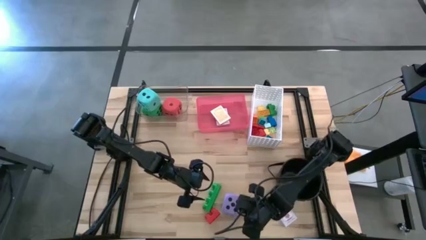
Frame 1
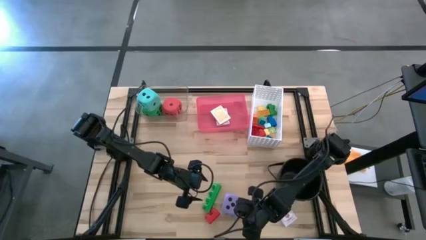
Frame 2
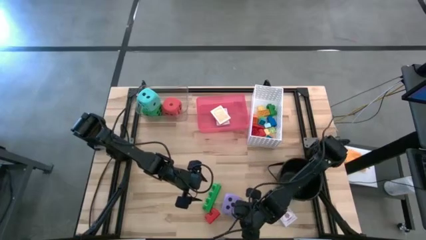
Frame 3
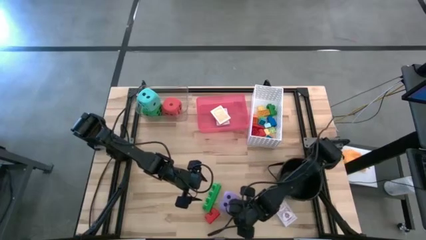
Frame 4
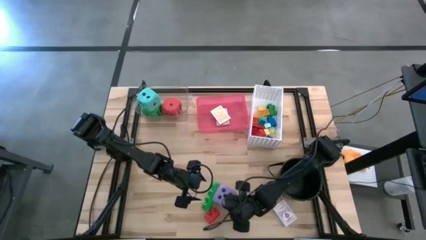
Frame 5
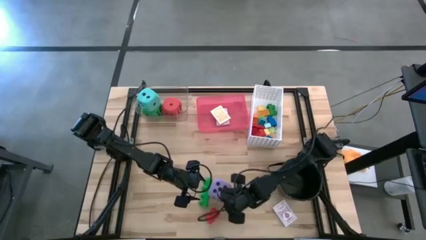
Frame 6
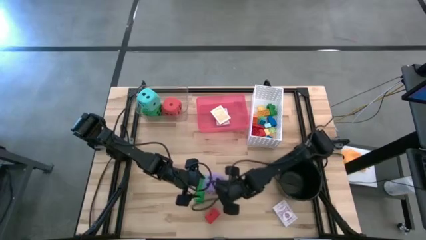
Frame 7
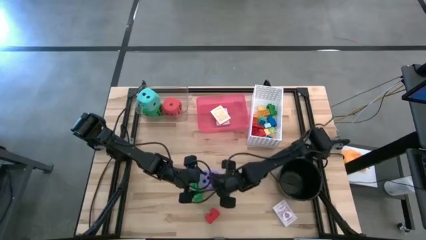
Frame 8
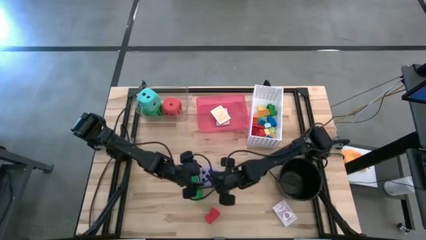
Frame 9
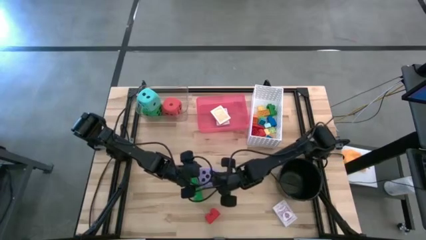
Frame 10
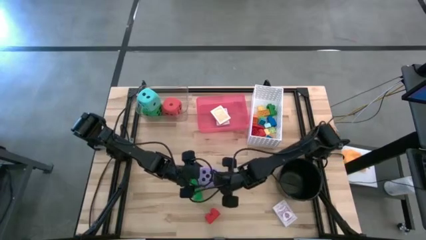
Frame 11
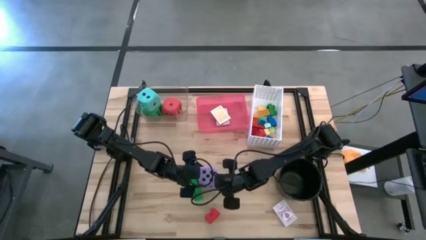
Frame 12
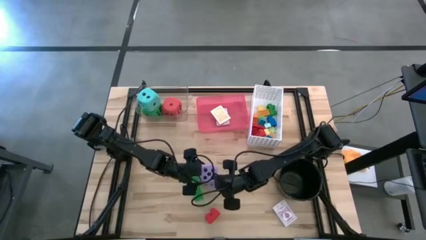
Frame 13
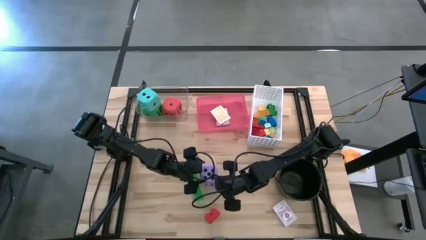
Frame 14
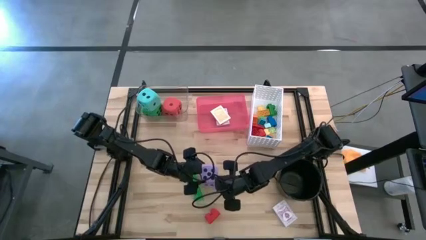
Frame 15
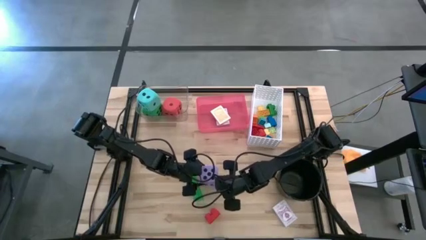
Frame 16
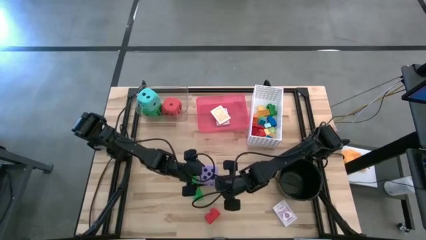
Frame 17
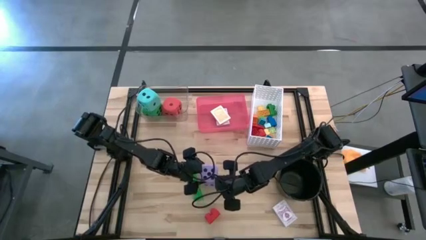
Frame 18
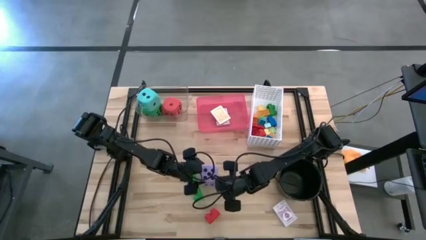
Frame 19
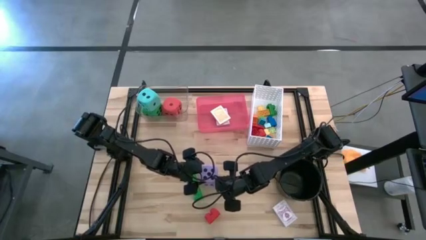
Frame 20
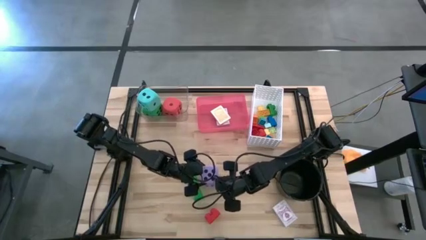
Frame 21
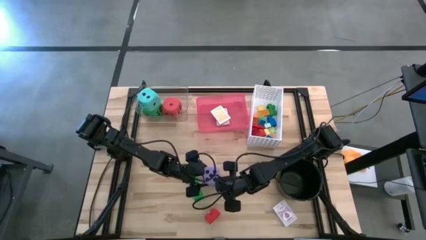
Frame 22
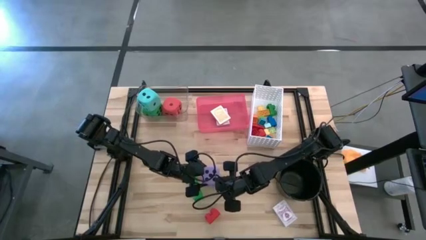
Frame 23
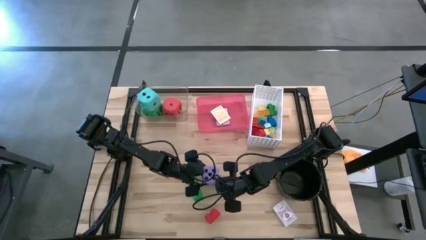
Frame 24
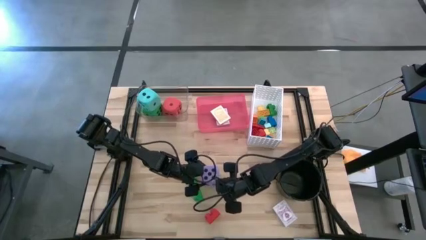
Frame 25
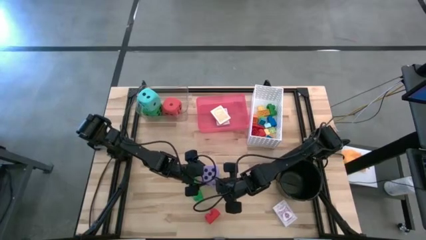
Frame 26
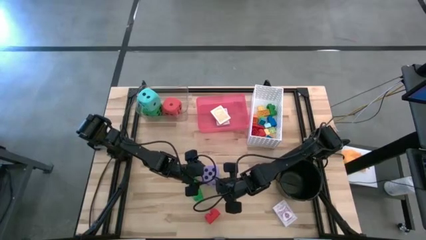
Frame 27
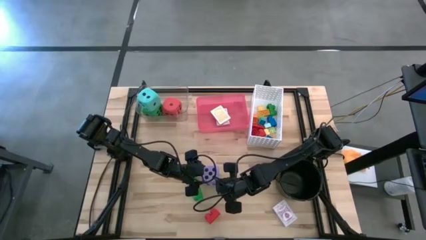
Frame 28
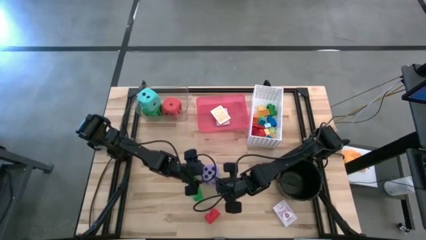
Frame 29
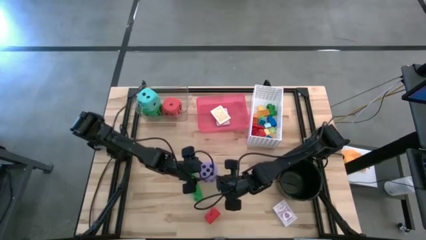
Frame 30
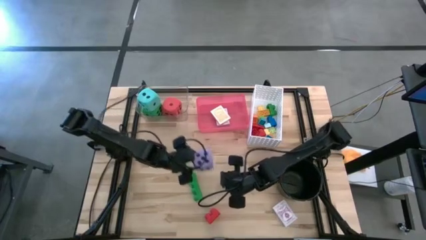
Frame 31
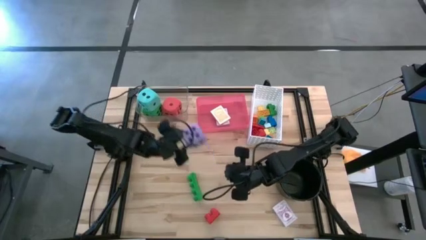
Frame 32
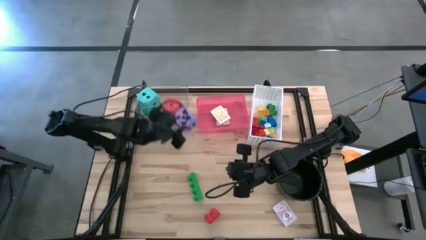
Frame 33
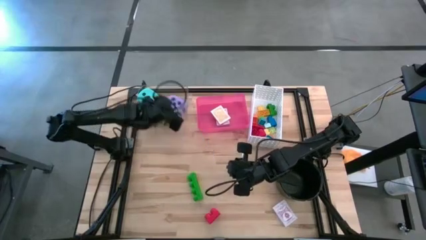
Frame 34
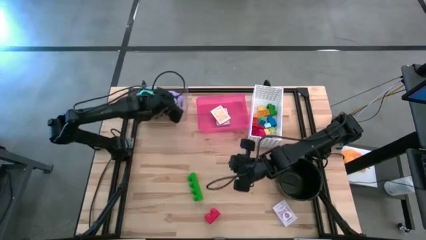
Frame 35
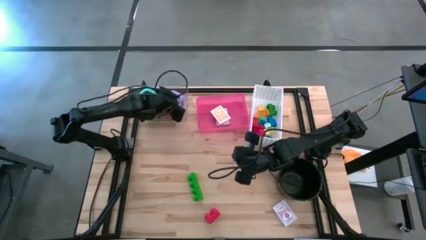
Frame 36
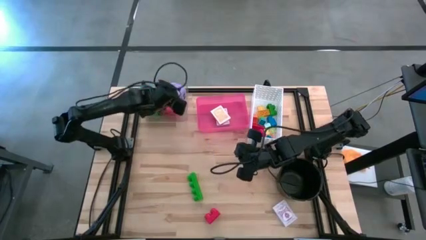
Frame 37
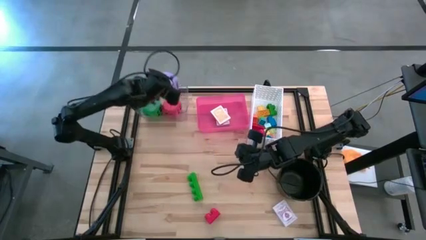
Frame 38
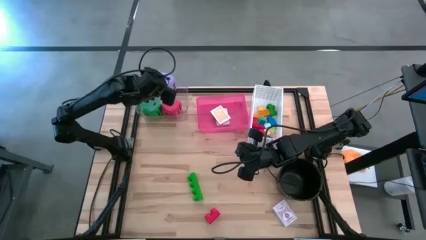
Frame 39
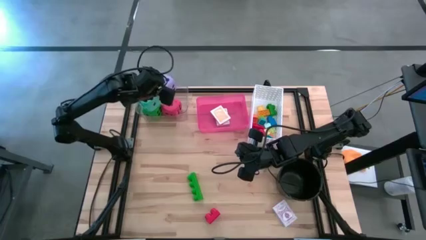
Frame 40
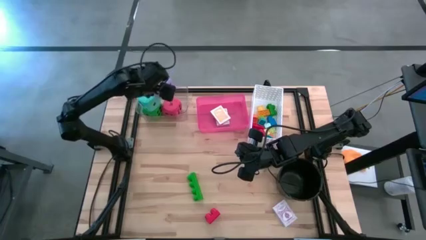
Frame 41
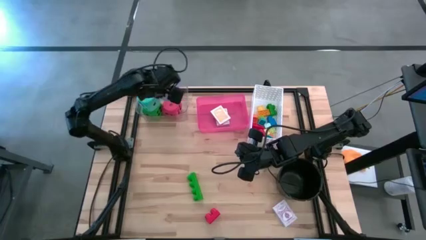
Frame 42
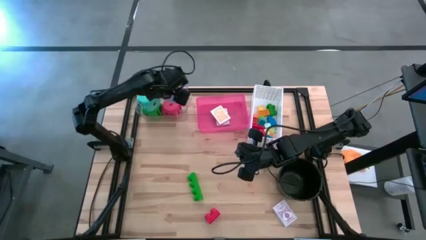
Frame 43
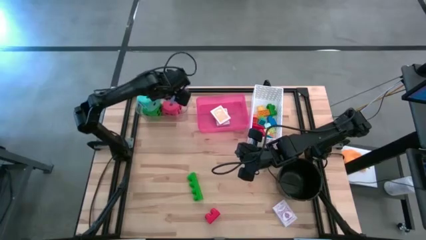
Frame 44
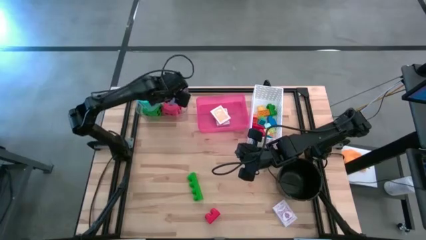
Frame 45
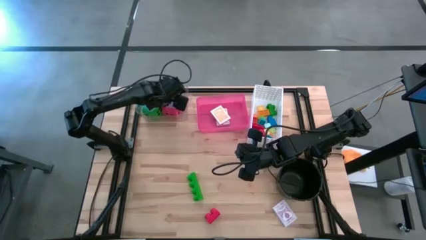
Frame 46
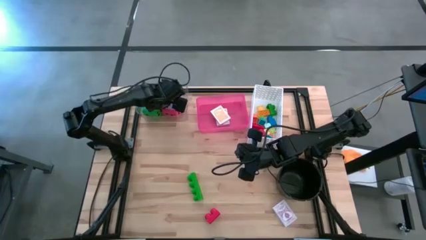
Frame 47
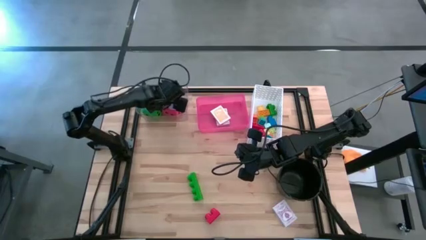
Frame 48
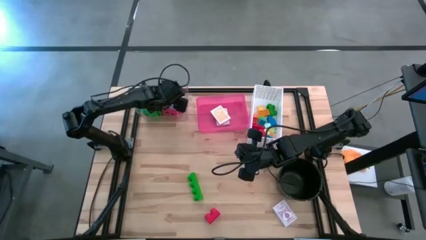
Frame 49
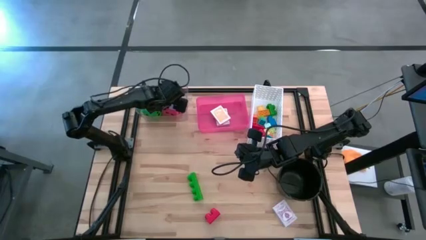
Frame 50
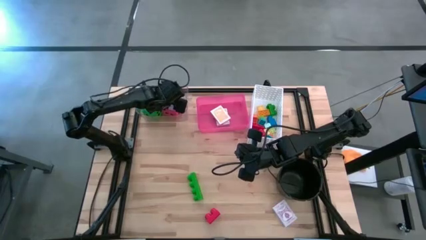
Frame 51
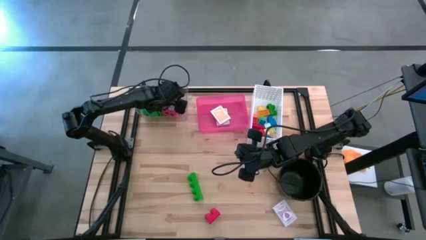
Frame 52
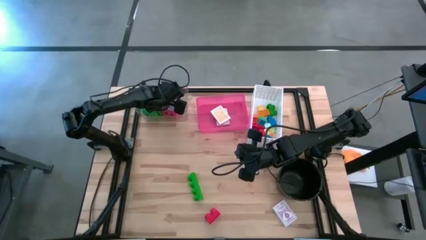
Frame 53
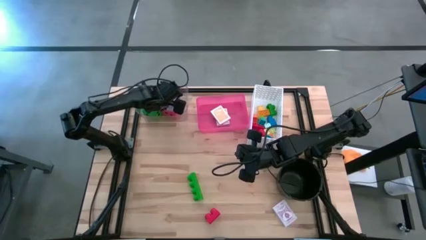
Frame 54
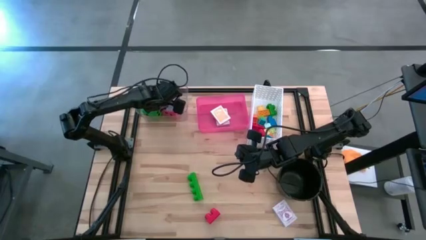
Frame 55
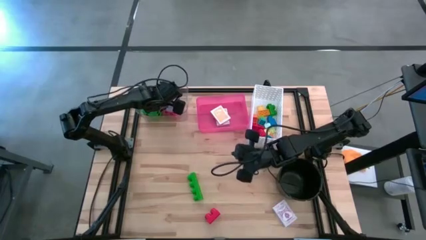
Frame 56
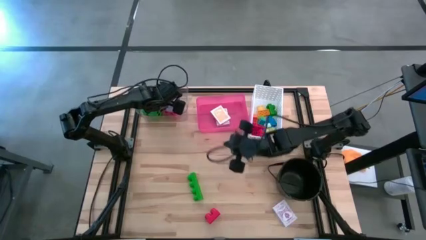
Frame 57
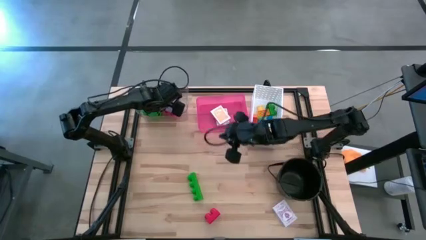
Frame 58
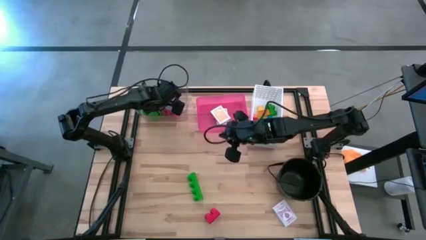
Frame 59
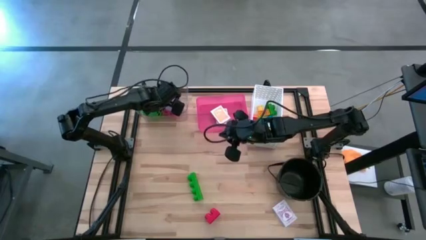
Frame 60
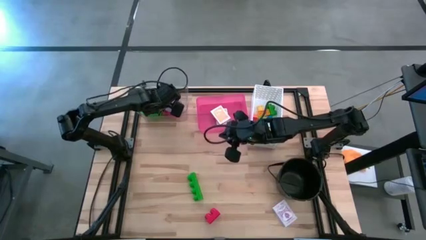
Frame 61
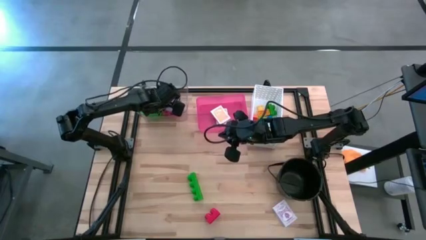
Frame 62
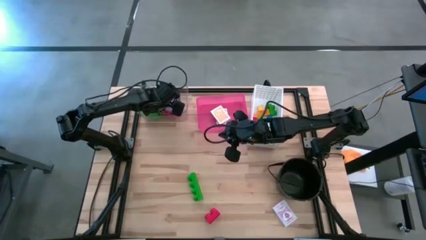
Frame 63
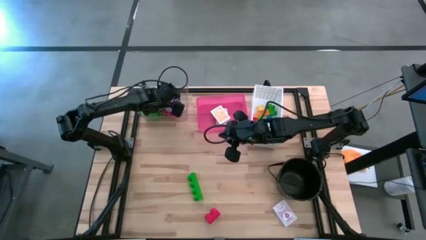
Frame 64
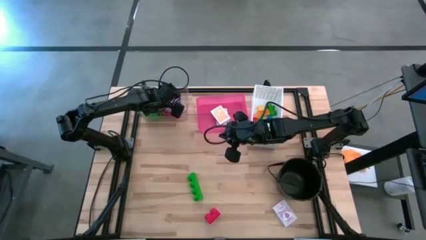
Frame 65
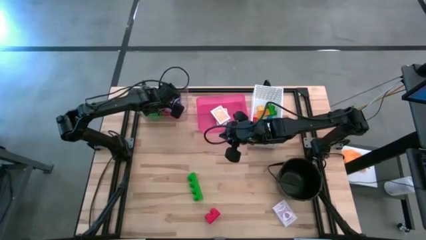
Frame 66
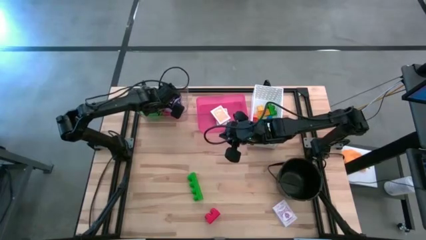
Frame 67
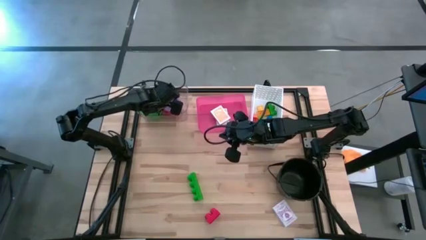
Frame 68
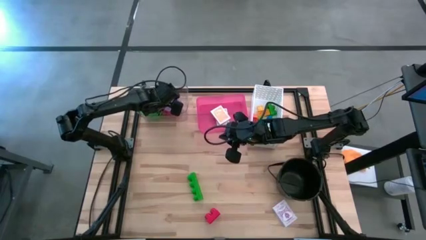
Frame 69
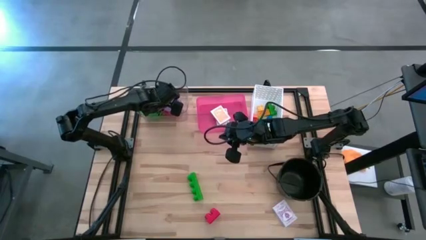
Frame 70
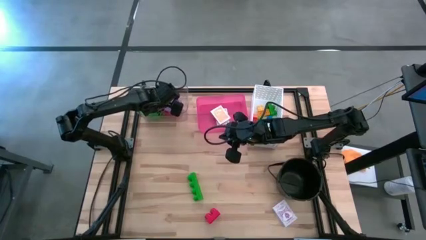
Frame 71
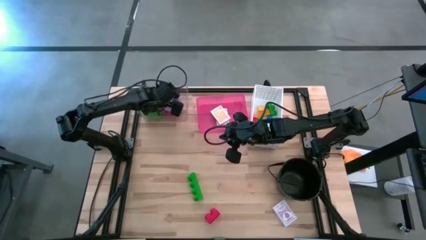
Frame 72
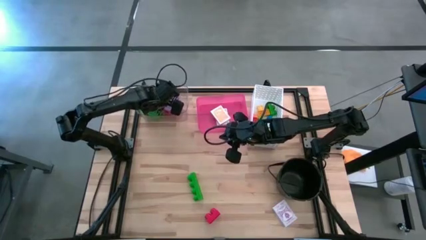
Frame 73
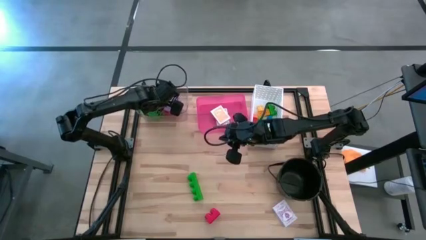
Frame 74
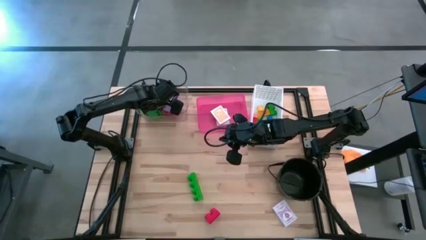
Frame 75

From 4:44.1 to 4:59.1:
Task: Pick & Place Toys
Put the purple die into the transparent bin

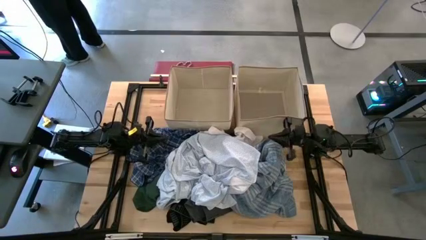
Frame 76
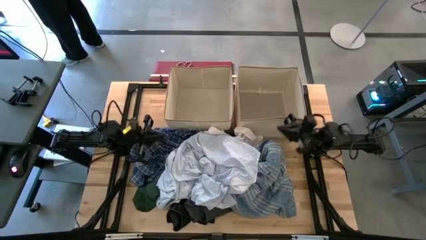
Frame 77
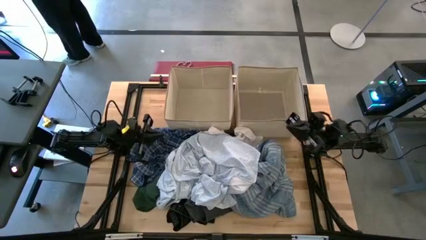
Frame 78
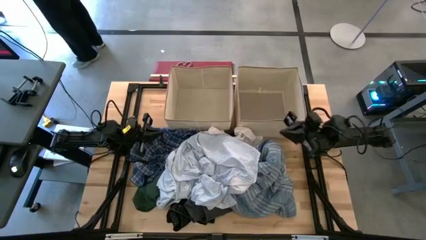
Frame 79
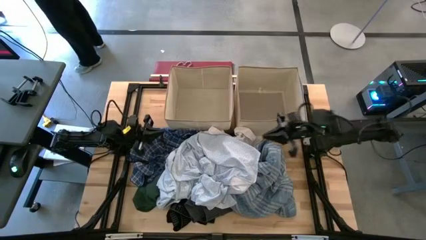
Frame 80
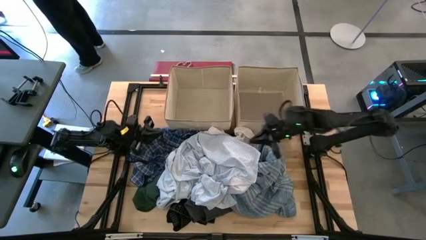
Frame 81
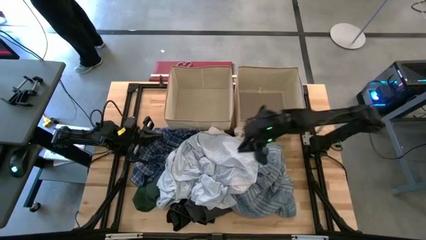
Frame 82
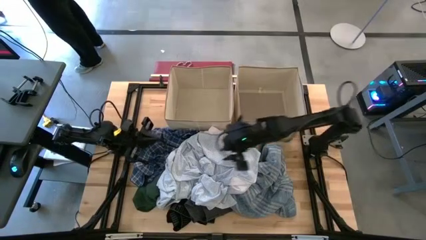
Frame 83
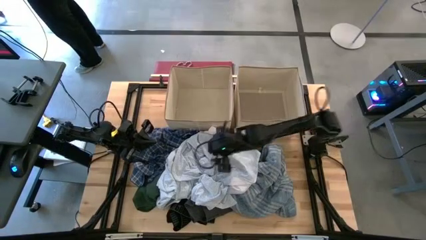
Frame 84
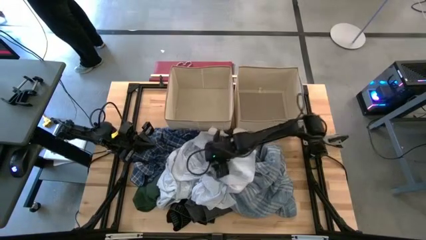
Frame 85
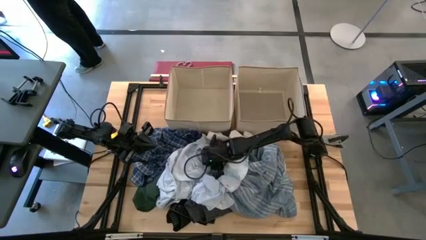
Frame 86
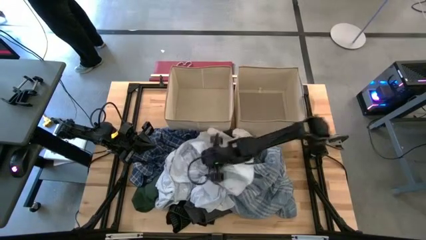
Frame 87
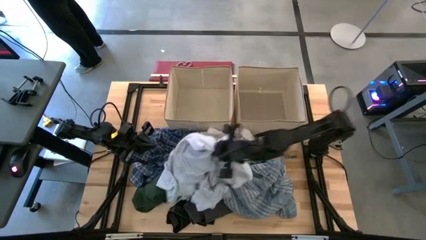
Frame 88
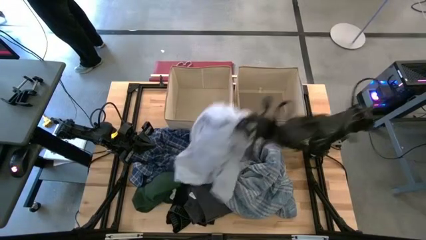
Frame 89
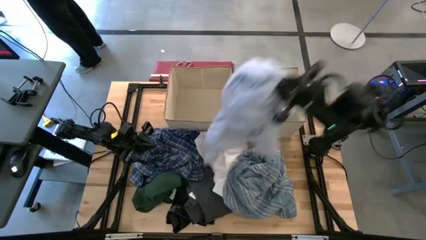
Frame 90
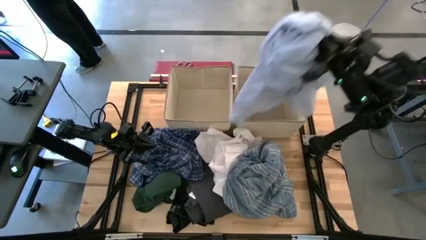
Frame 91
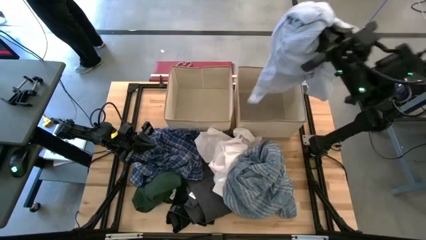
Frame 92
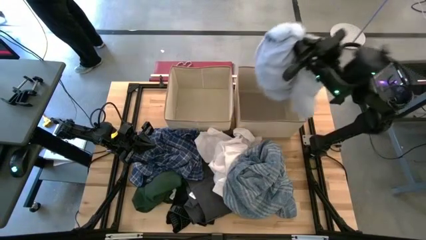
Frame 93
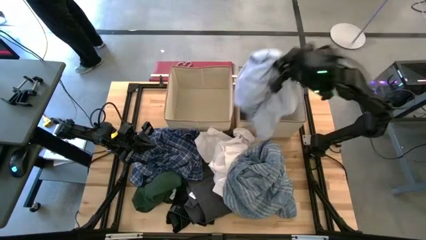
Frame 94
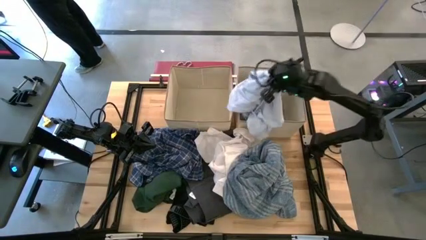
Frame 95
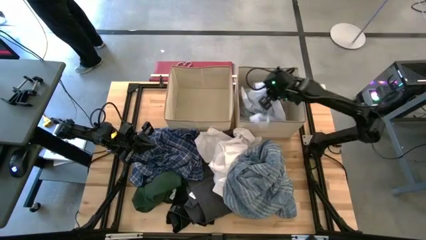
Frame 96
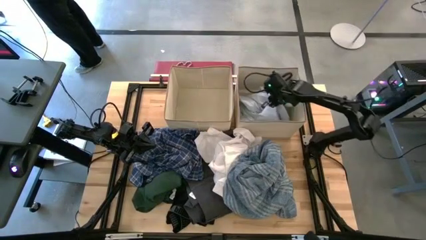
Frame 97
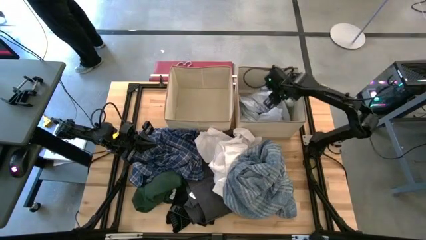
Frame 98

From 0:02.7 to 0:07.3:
Task: Sort clothes
Put the white patient gown into the right brown bin
